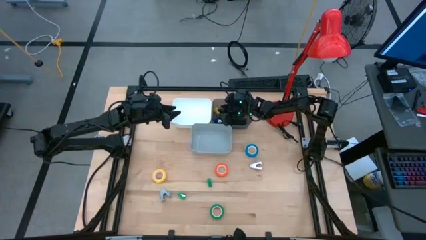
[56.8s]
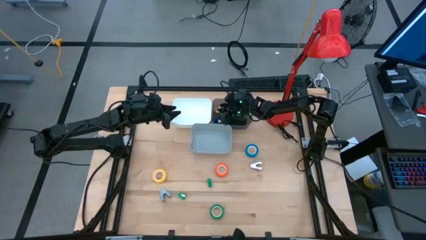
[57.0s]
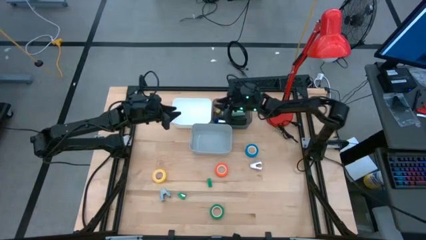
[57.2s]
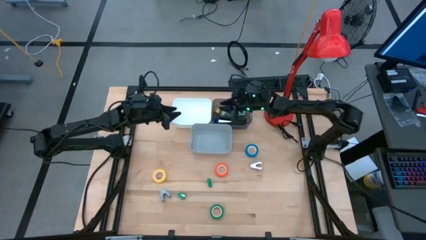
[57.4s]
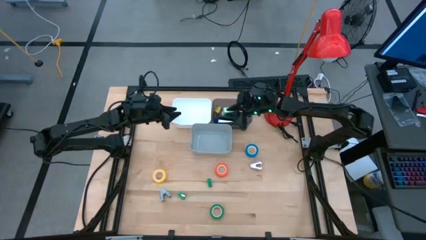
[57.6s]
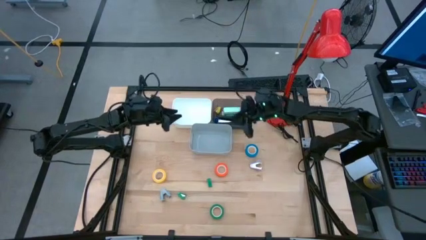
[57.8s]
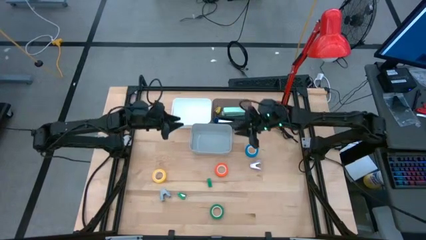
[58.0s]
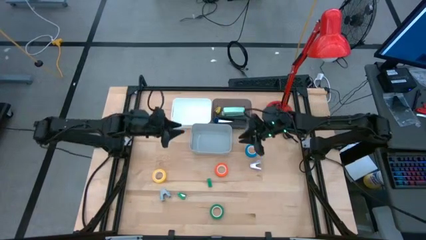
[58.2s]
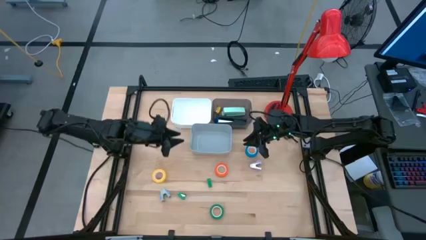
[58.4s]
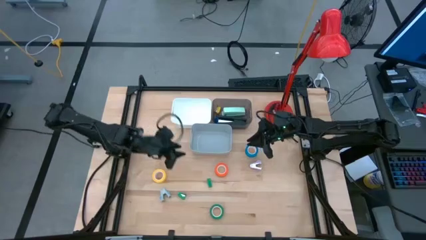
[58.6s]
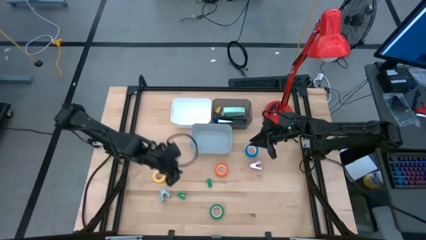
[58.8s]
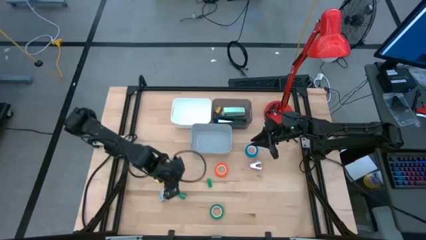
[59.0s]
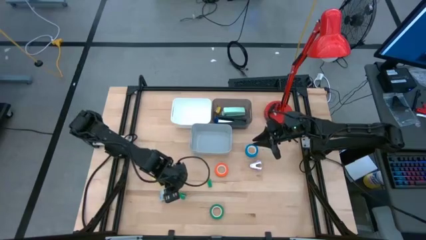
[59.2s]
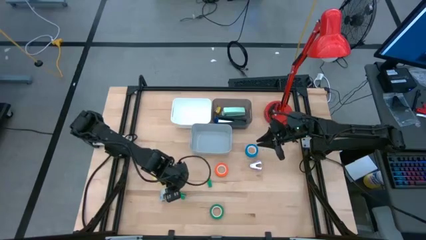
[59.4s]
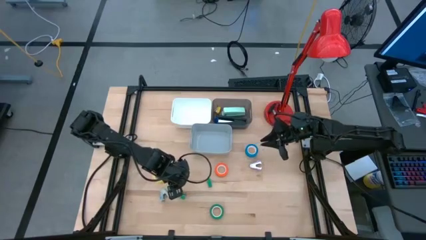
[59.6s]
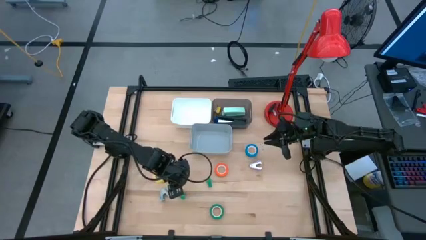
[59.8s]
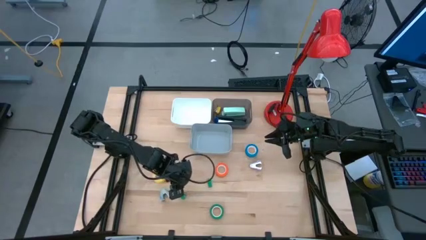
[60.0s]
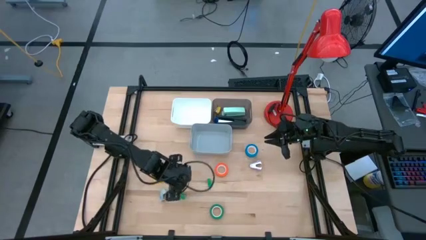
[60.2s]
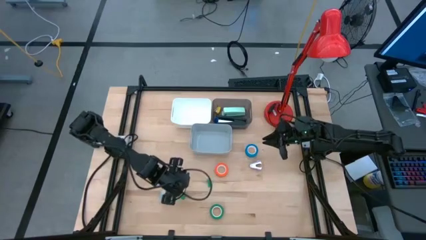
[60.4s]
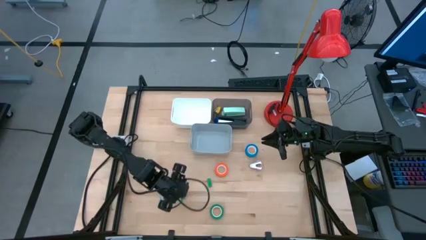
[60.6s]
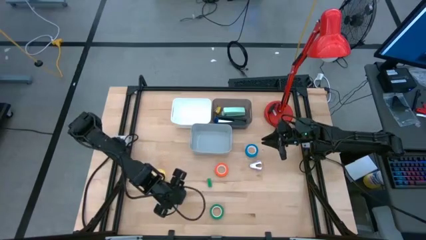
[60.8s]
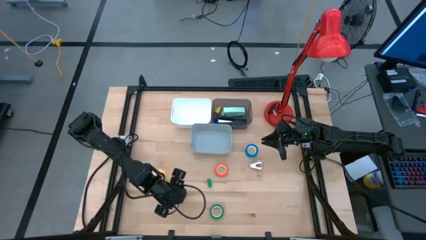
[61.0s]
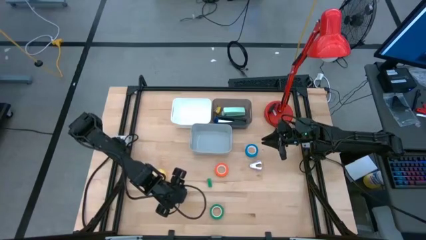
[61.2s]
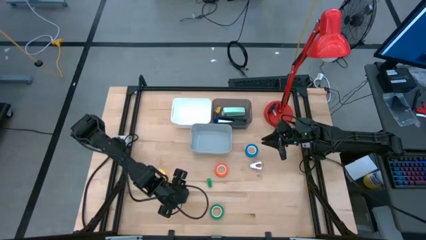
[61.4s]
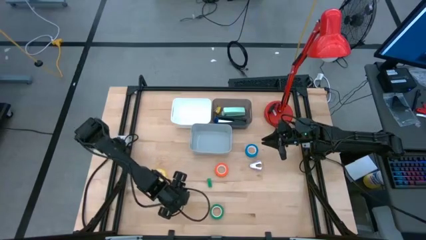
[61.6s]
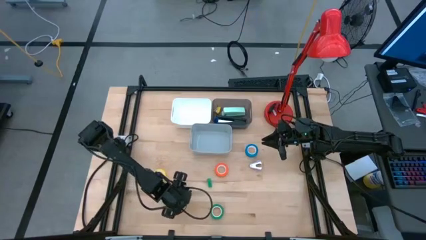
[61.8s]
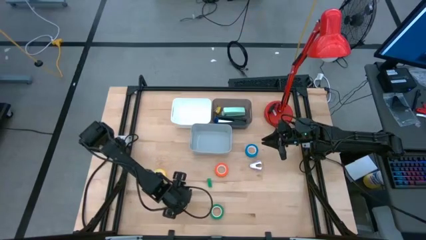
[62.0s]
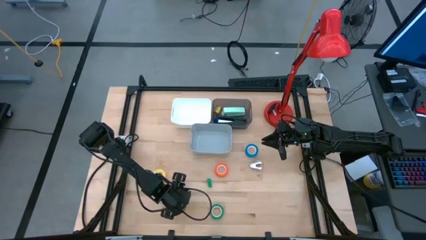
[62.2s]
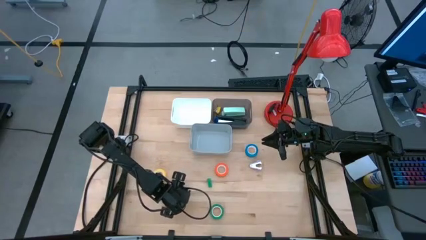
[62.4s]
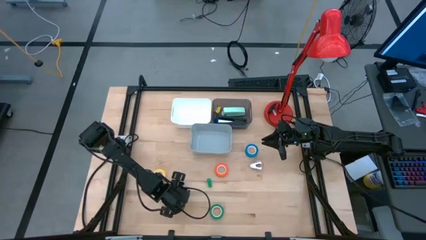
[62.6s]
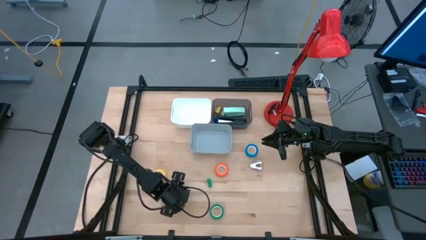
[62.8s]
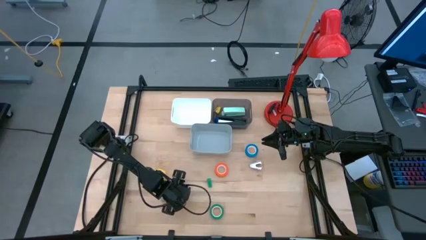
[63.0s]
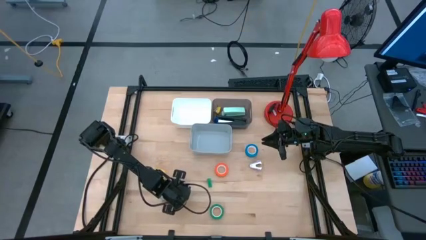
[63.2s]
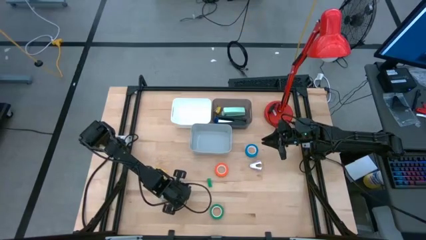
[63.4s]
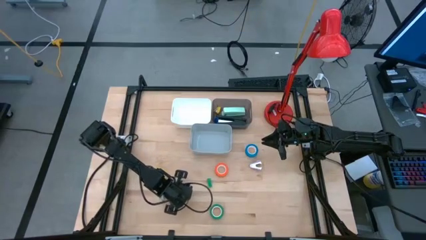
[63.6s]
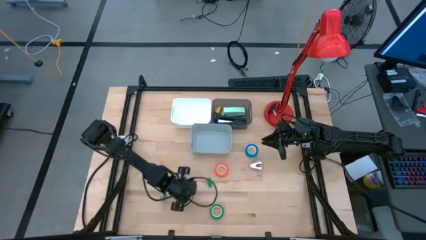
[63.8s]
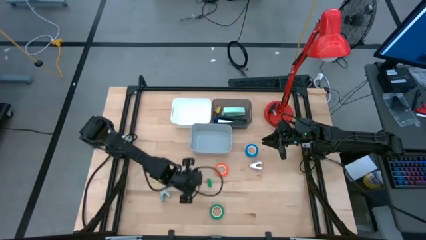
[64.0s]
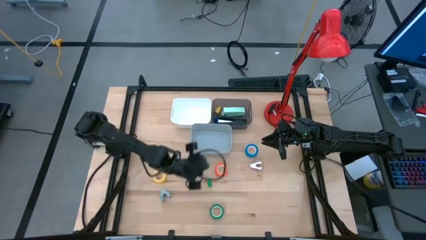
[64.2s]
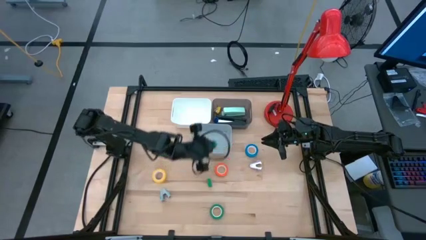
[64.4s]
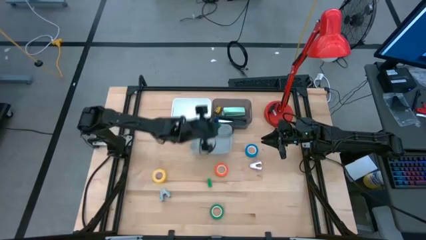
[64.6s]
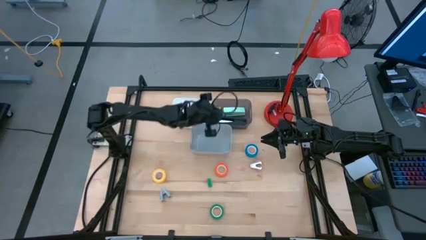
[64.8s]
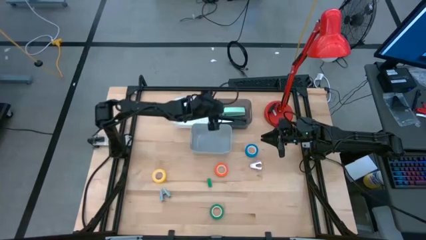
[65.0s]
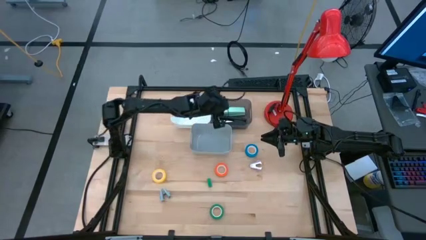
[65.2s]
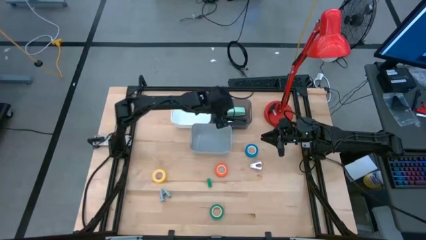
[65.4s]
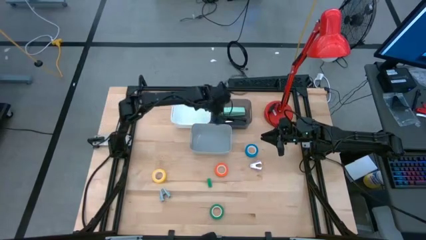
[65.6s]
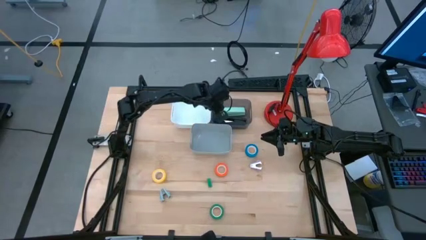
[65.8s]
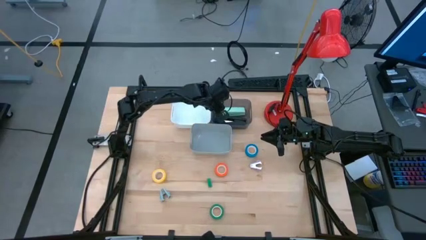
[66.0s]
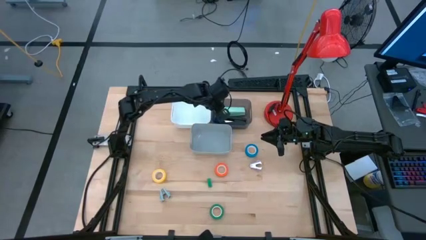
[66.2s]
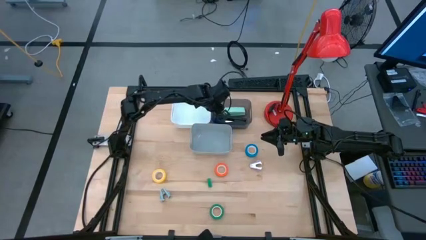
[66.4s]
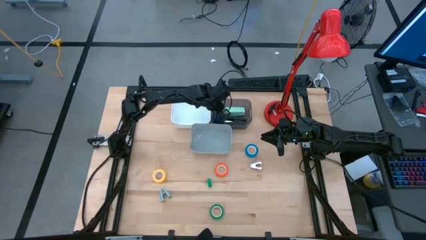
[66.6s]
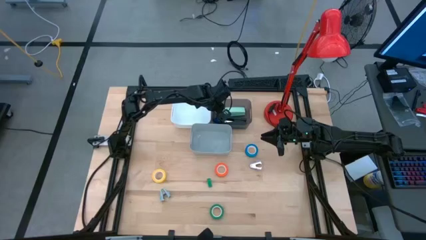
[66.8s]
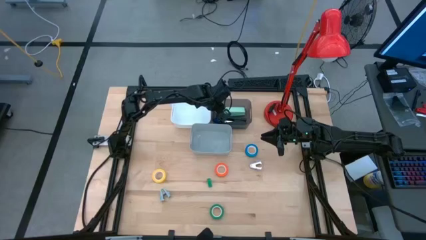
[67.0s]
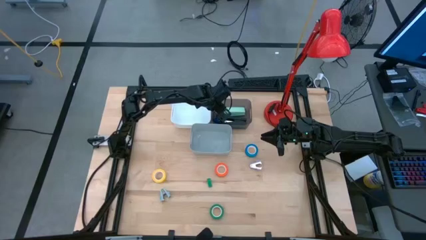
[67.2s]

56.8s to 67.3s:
Task: Pick and place Stapler, Stapler remover, tape
Put the green stapler into the black bin
